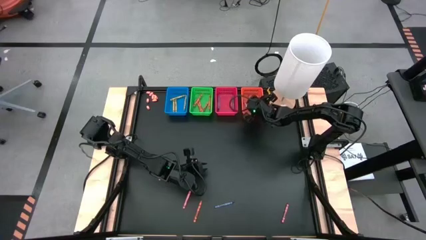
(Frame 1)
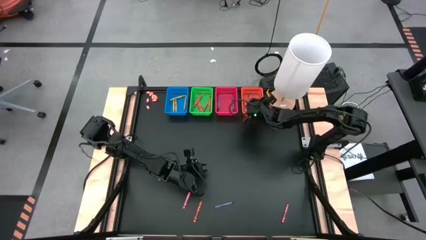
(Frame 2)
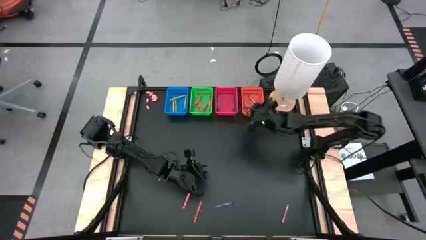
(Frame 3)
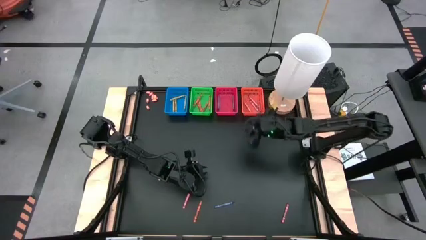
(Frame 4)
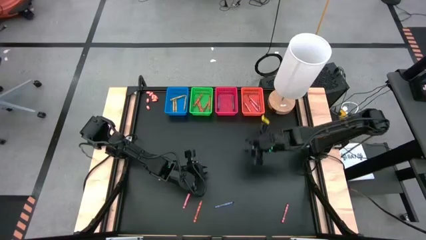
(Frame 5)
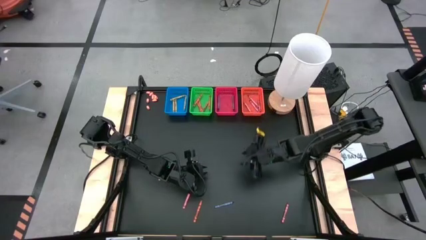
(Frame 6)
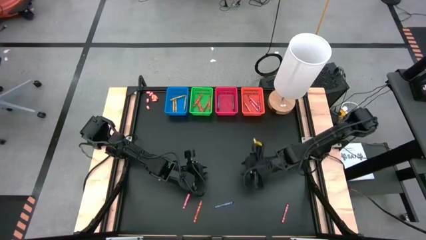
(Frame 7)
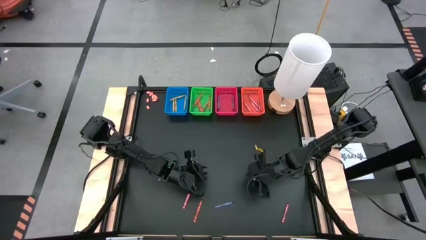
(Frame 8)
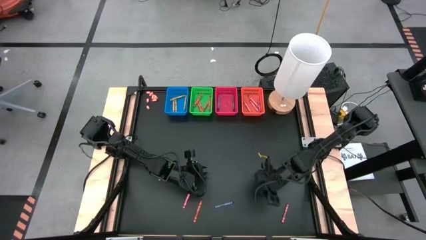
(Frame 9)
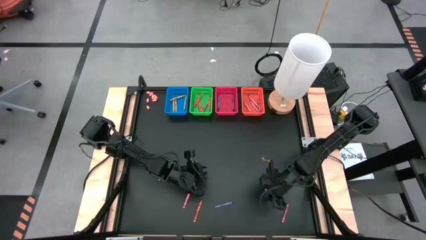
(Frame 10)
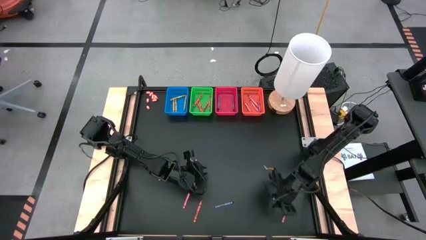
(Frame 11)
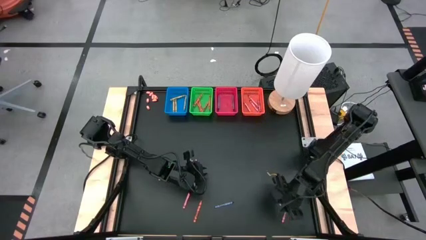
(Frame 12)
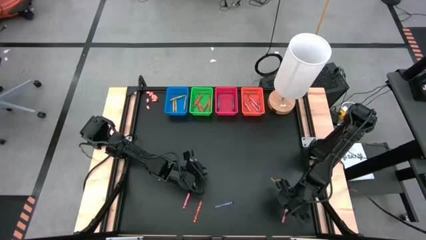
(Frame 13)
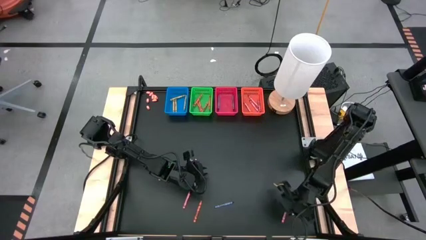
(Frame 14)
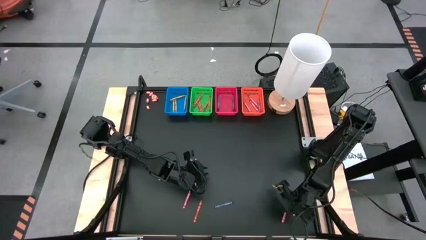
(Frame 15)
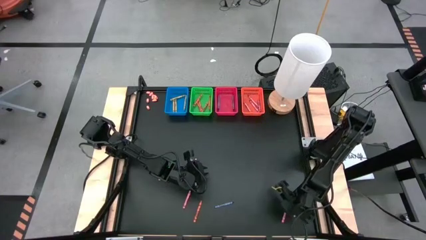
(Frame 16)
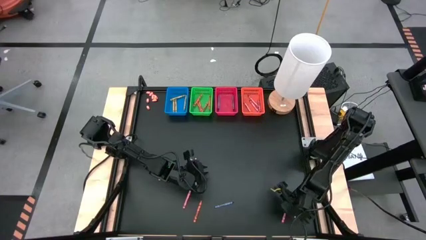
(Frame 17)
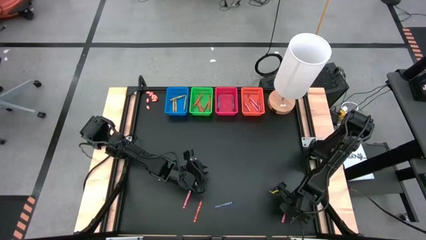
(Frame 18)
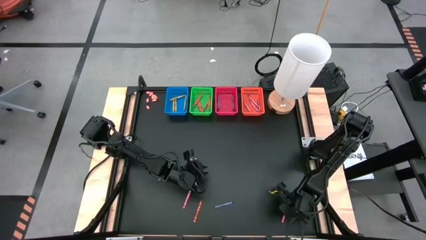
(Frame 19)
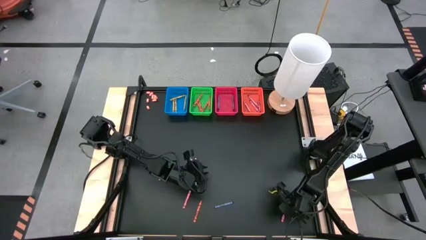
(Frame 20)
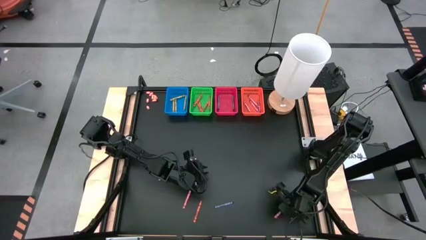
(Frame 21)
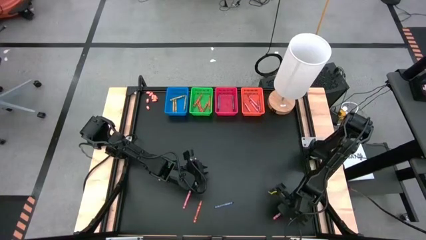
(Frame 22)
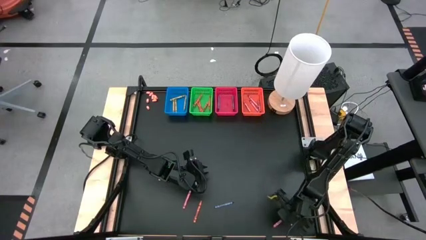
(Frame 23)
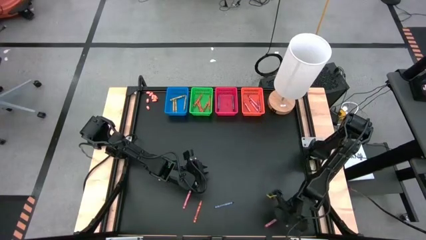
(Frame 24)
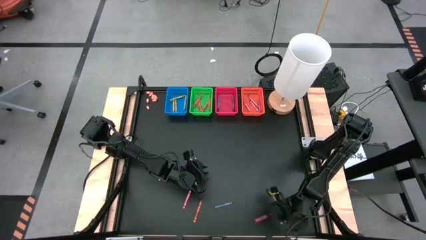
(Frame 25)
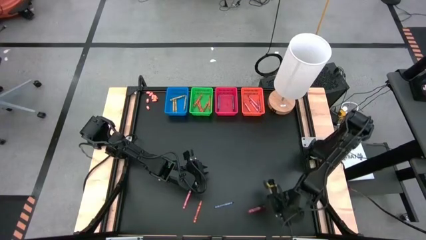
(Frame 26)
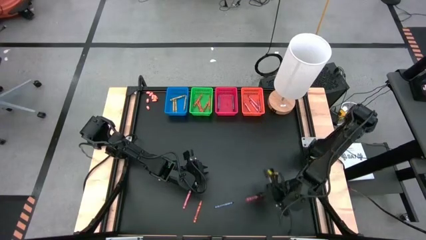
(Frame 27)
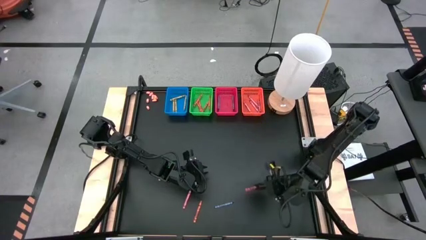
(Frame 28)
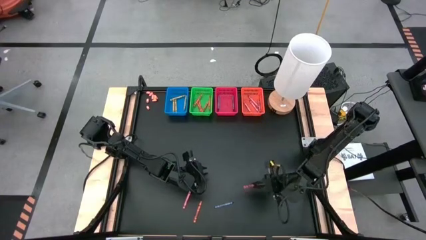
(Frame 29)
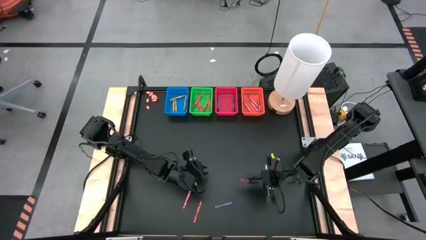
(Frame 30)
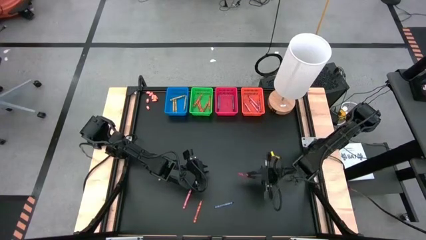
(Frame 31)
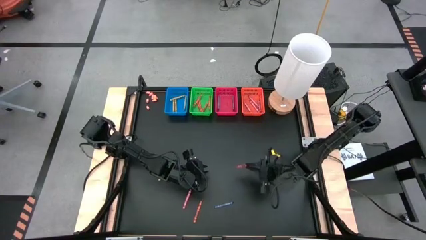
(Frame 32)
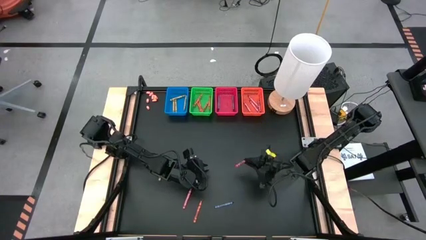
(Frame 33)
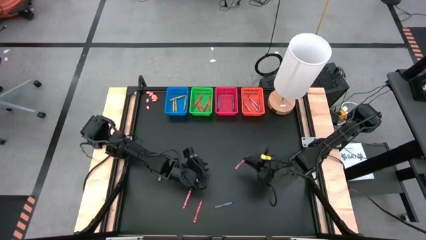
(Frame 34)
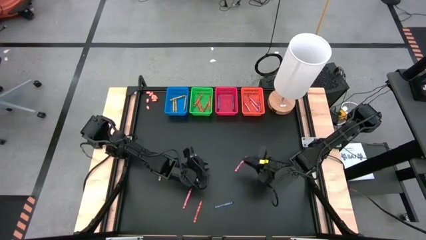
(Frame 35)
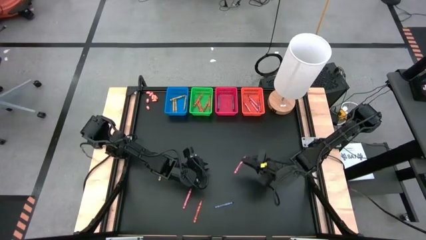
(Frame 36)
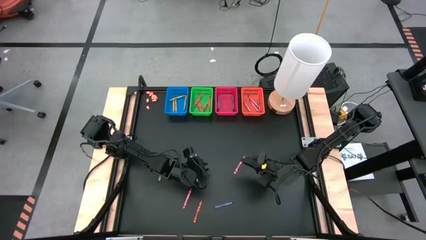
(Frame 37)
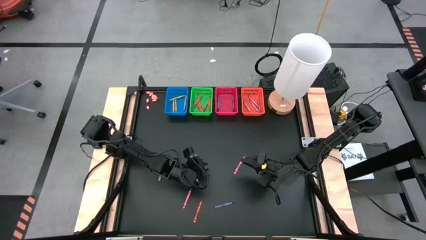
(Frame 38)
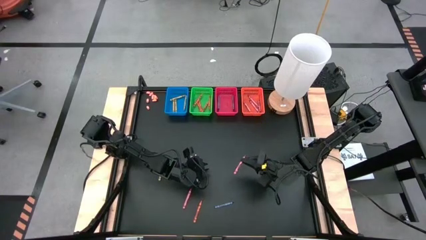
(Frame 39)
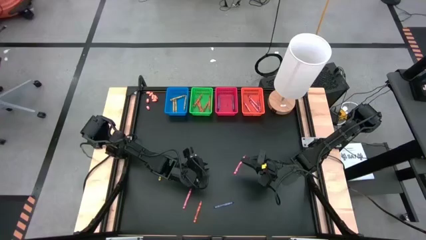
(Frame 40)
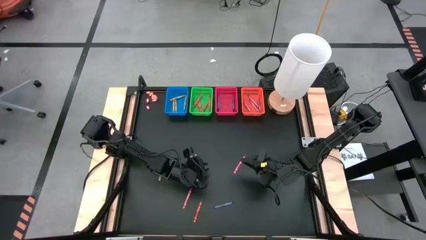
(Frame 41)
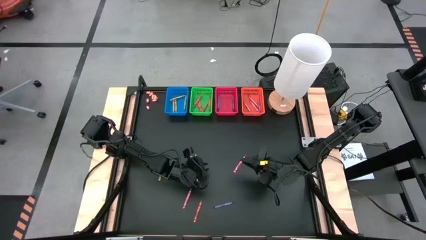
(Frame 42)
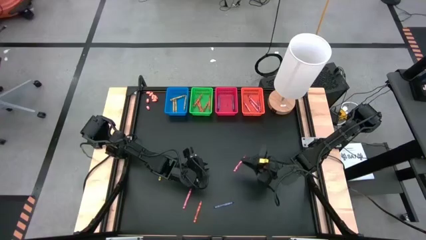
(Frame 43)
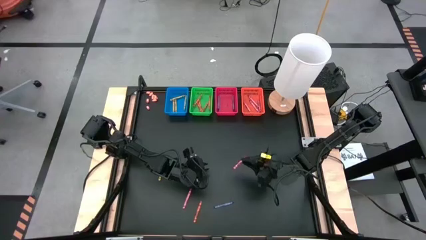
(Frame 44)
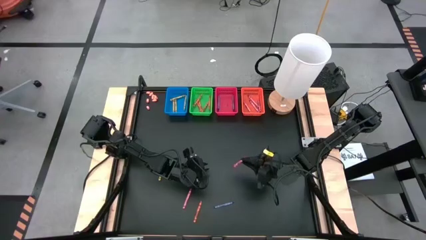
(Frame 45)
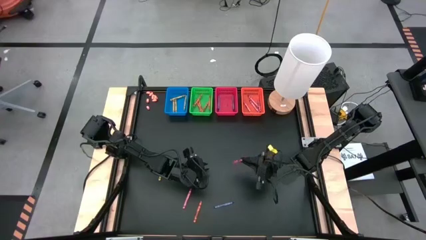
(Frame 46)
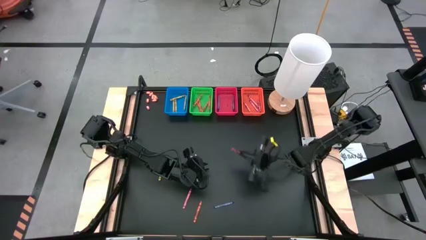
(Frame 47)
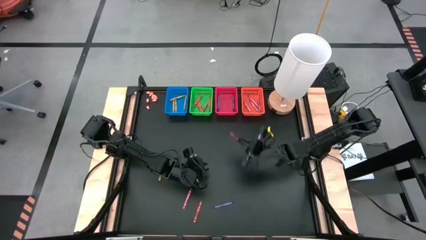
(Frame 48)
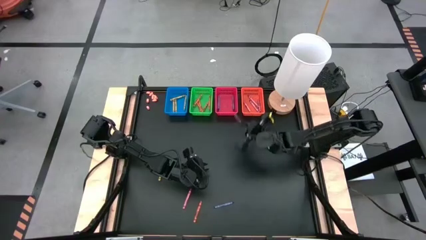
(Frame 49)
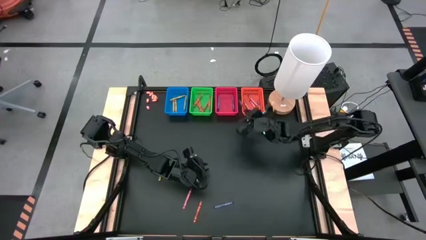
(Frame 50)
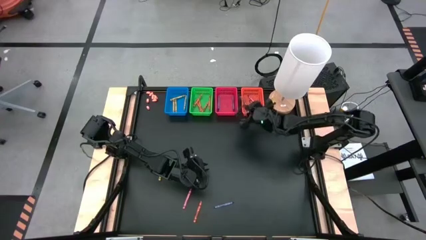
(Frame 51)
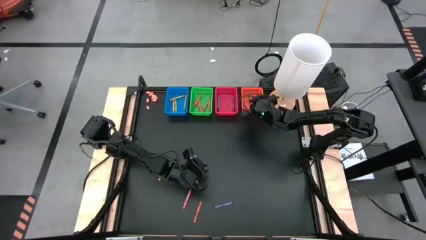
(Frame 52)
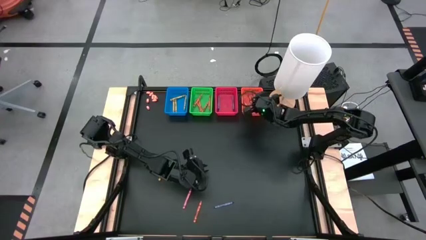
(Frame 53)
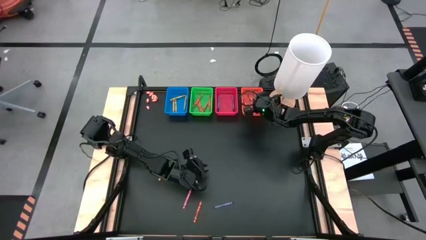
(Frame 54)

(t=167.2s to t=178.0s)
Task: Sort crayons
Put the red crayon into the orange bin

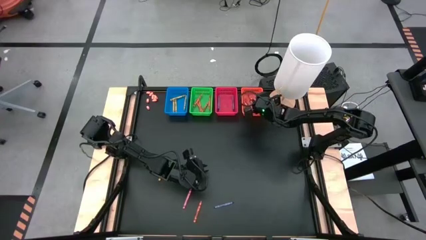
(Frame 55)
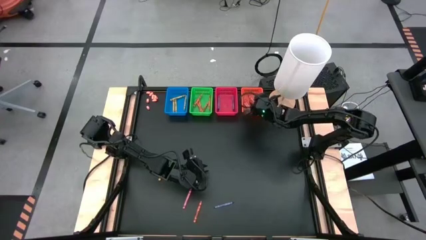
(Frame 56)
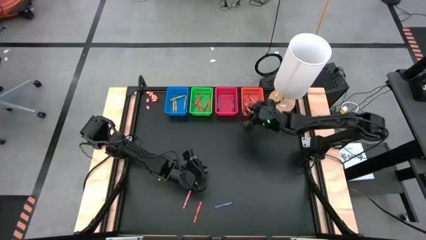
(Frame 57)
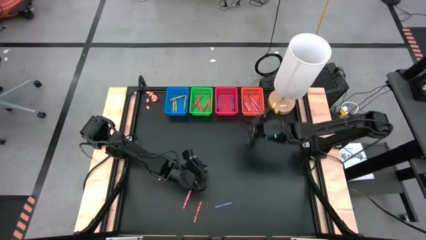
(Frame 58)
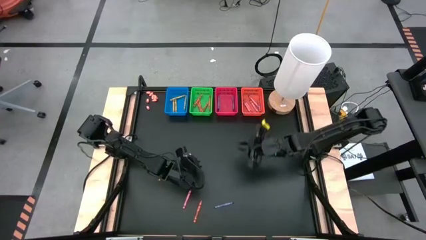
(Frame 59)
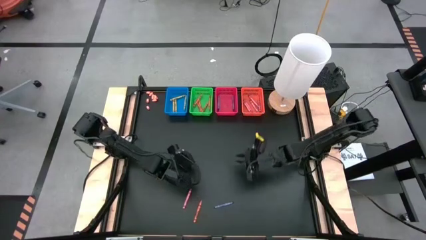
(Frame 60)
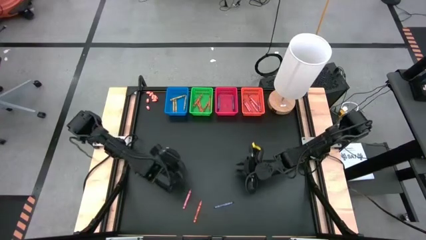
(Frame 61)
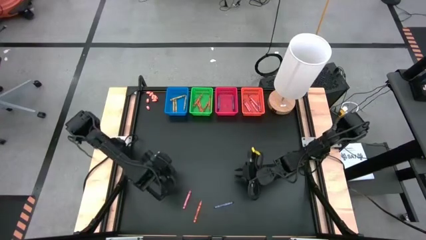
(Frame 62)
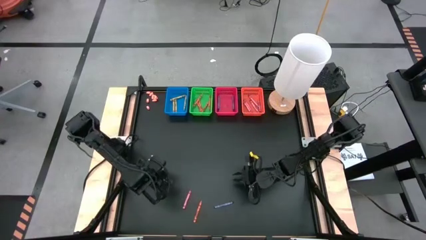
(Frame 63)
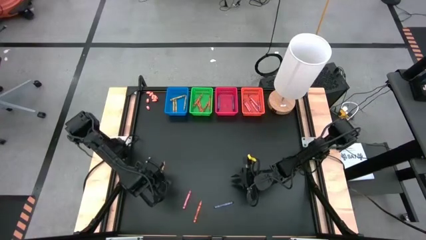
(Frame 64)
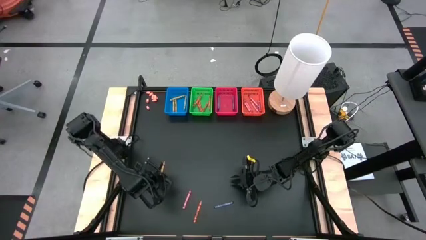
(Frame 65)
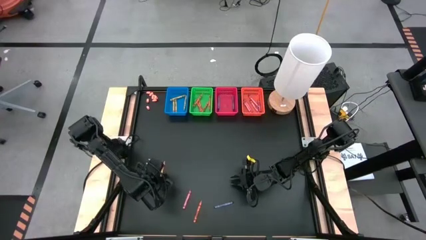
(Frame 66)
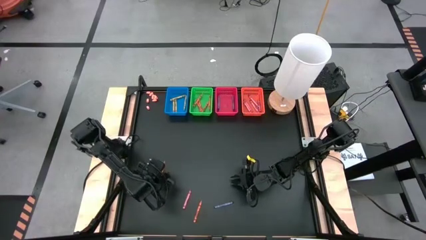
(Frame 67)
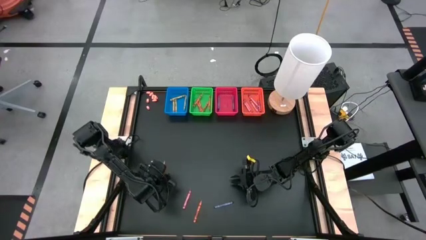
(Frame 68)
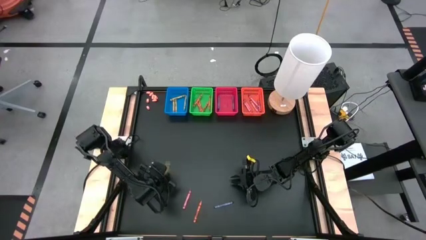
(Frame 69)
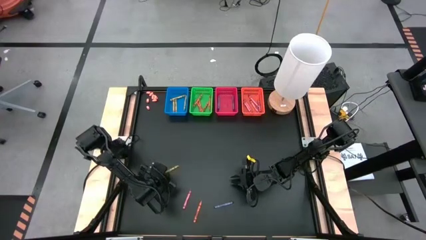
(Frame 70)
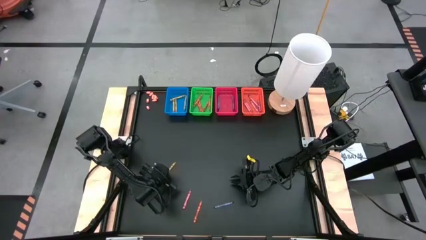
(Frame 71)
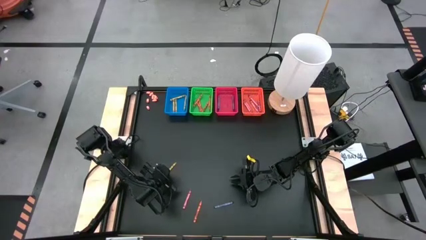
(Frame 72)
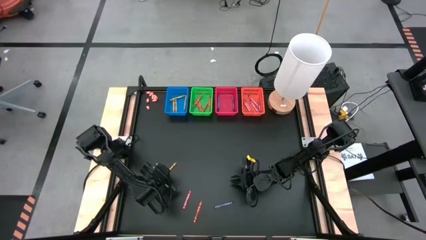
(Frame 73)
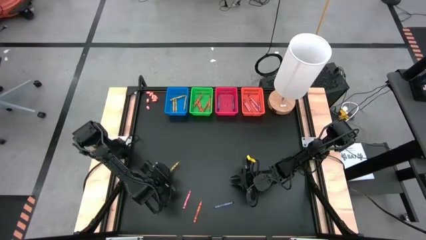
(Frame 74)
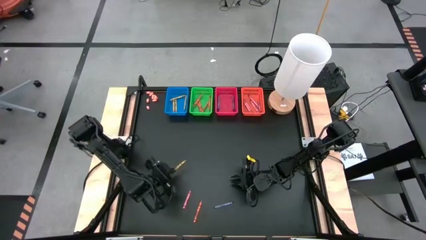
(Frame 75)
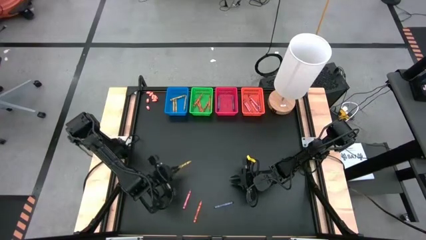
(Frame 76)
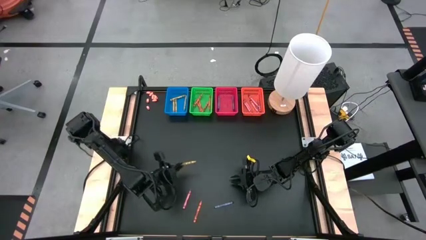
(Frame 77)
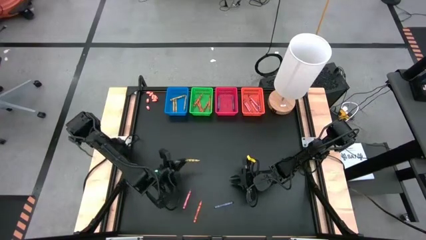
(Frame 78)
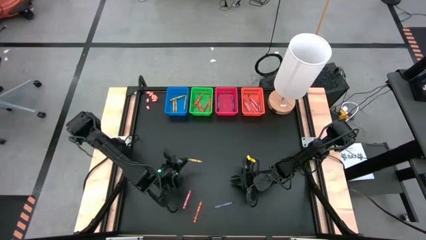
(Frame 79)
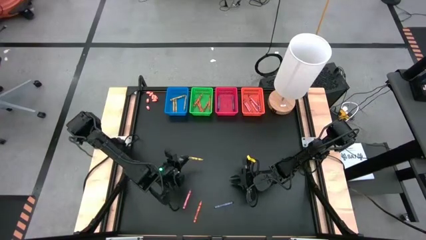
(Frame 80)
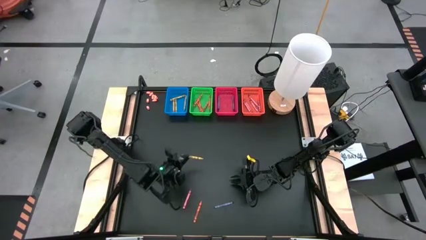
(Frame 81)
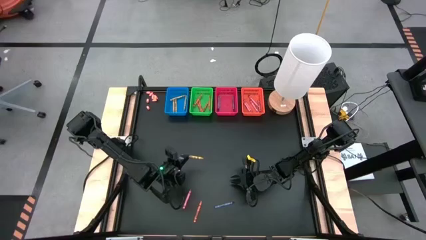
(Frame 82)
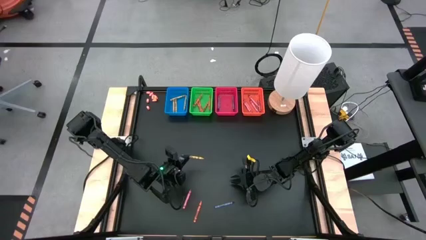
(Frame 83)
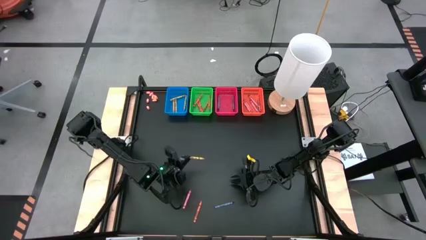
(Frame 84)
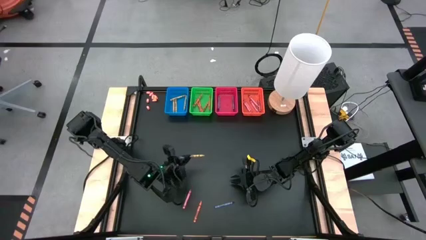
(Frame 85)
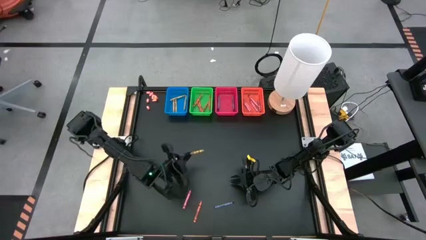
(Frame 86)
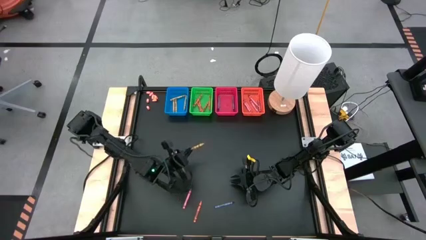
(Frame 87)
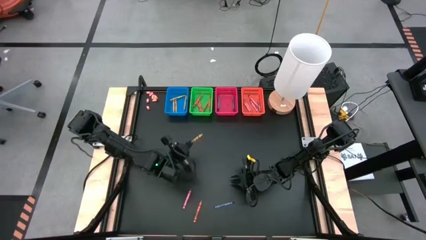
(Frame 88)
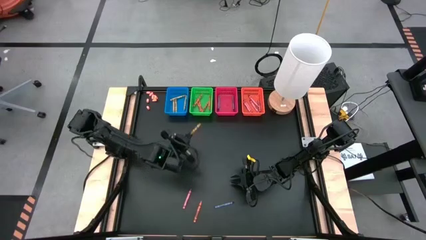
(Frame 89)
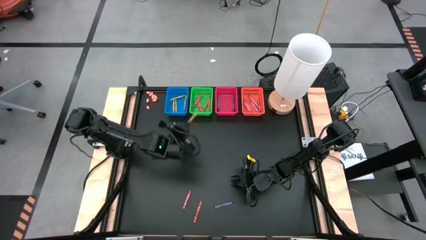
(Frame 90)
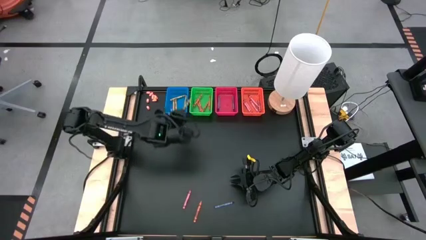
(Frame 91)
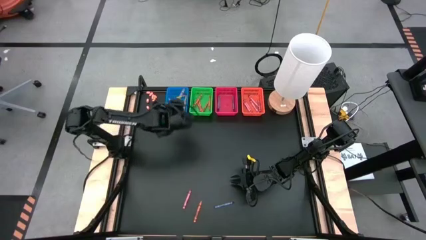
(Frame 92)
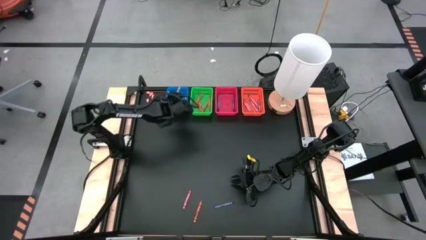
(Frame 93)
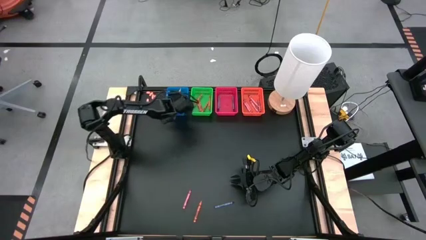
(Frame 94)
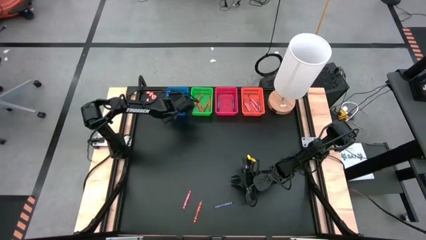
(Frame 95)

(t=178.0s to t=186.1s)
Put the yellow crayon into the blue bin
